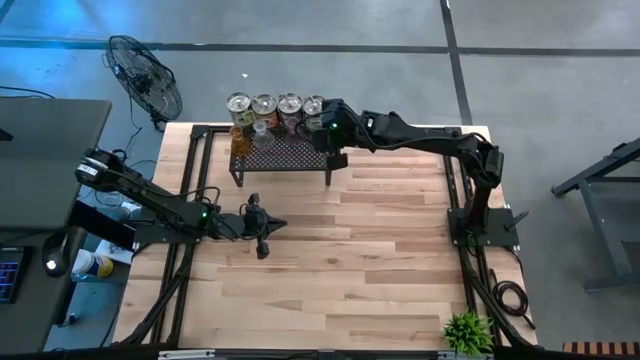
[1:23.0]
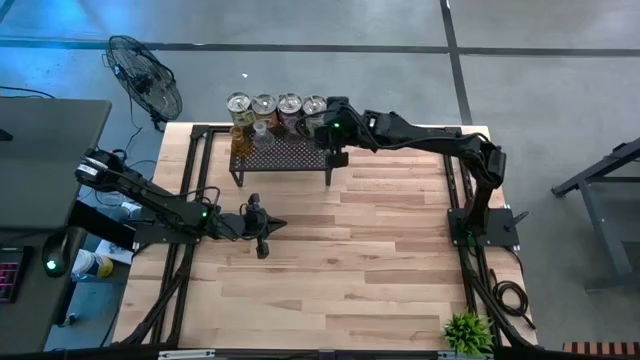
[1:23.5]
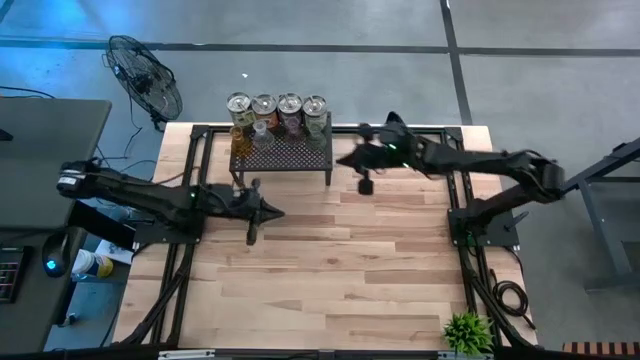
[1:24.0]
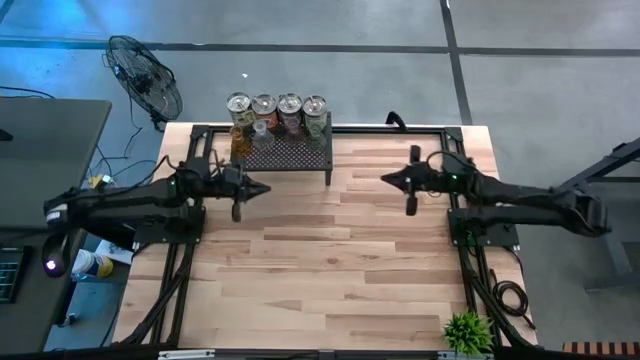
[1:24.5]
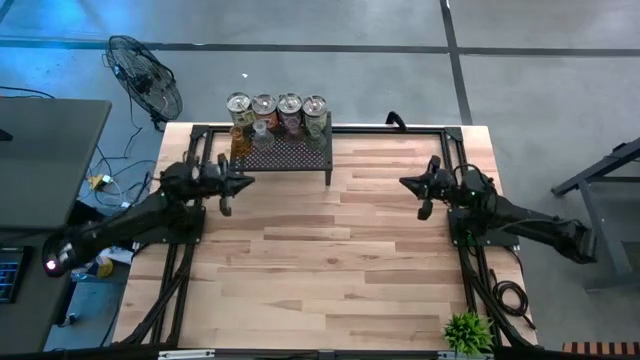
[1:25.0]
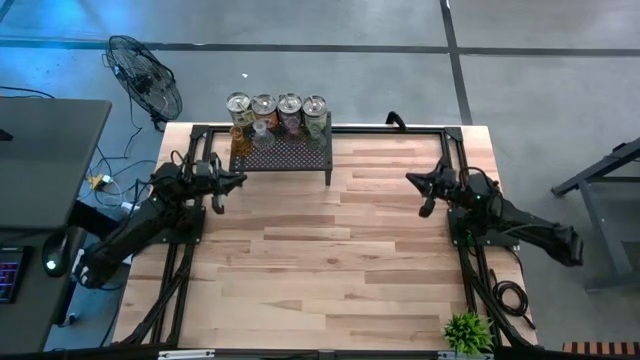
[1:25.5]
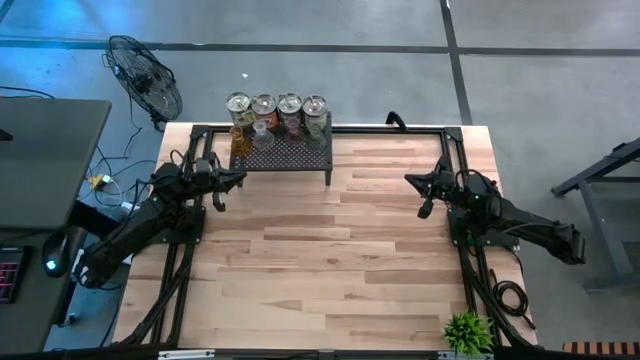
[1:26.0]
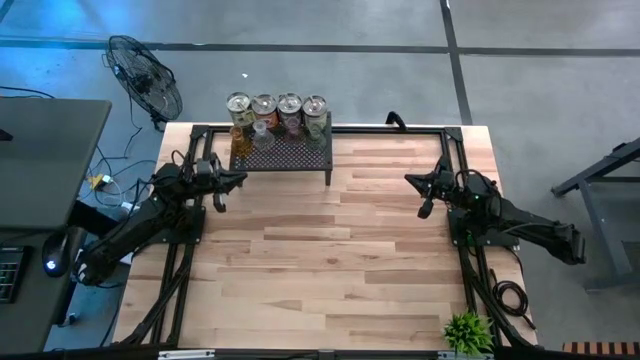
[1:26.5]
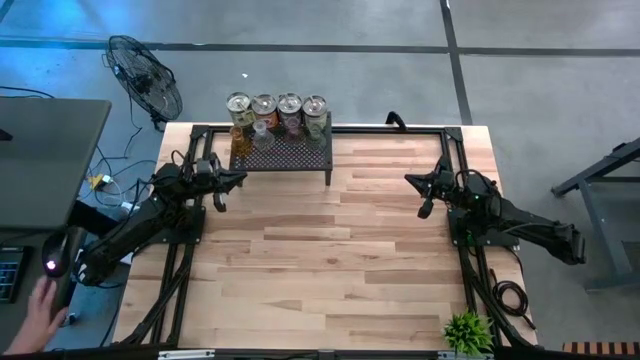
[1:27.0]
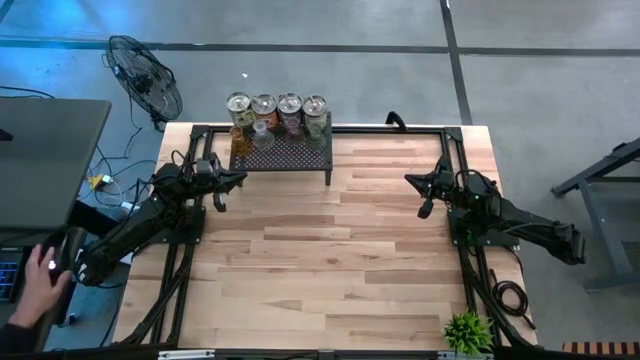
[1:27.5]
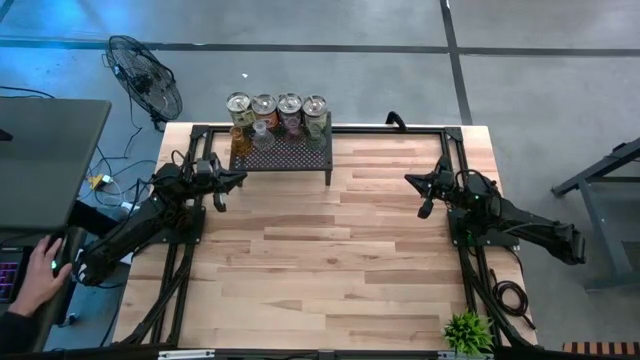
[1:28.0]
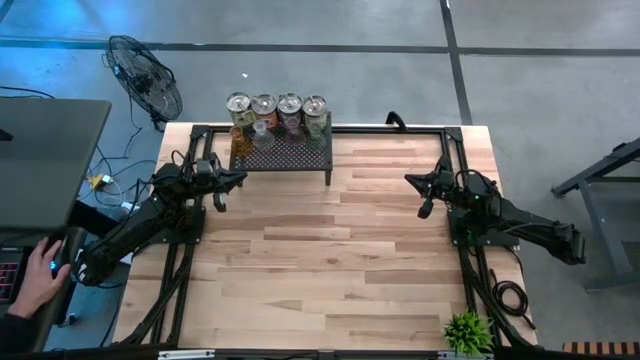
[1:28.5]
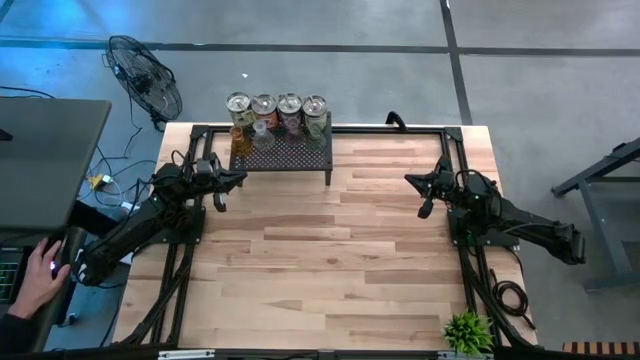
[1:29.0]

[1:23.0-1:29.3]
Task: Pick & Place candle stick holders
Return to Home Position

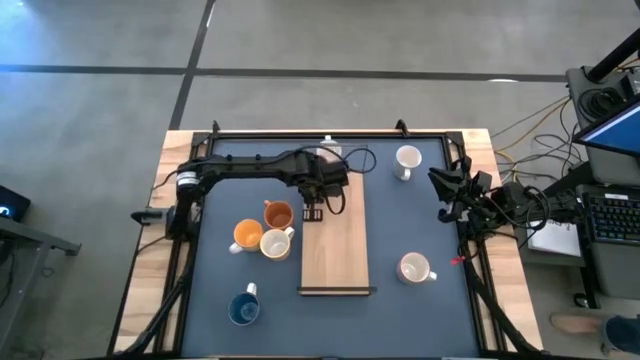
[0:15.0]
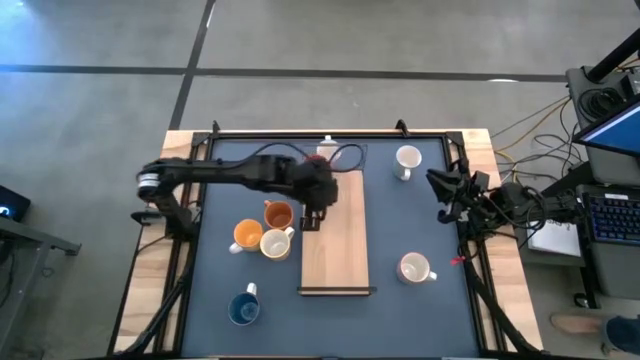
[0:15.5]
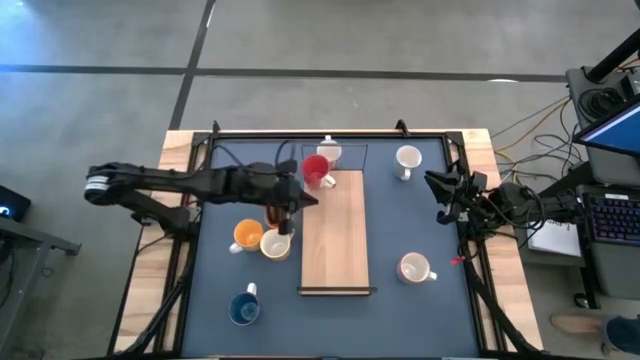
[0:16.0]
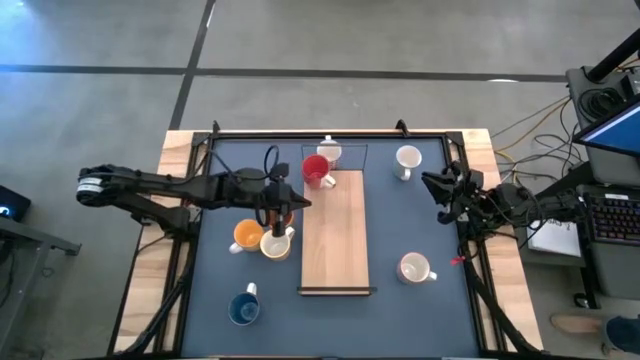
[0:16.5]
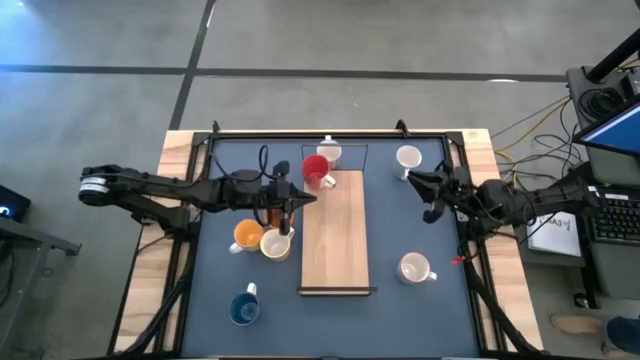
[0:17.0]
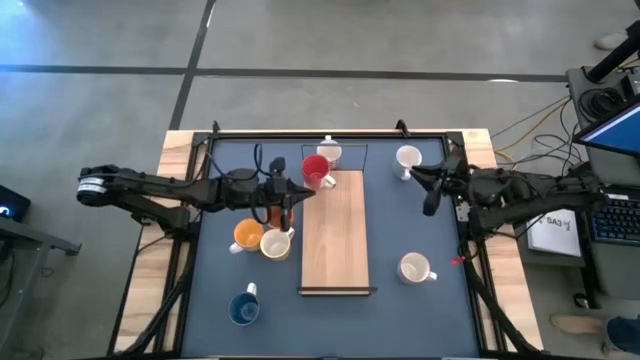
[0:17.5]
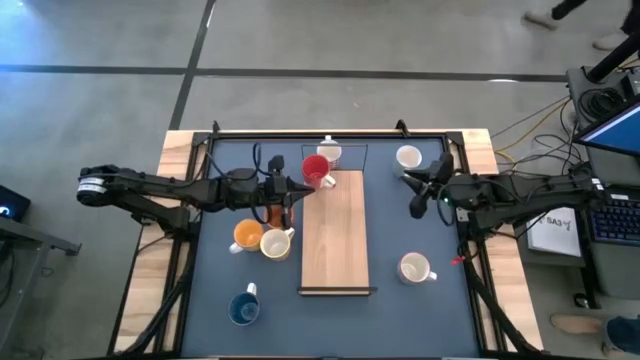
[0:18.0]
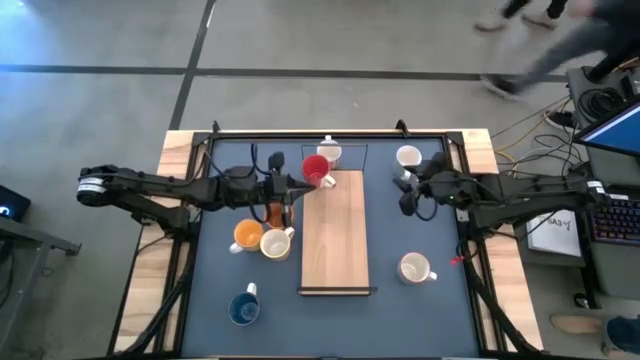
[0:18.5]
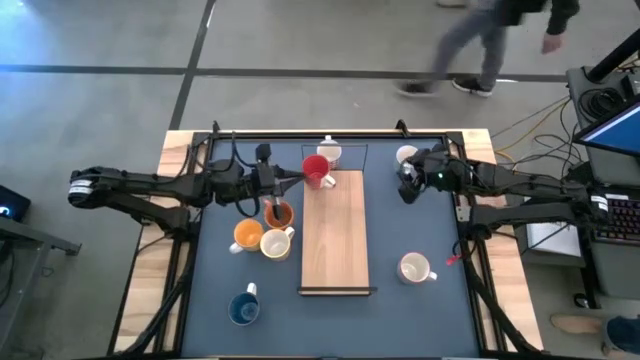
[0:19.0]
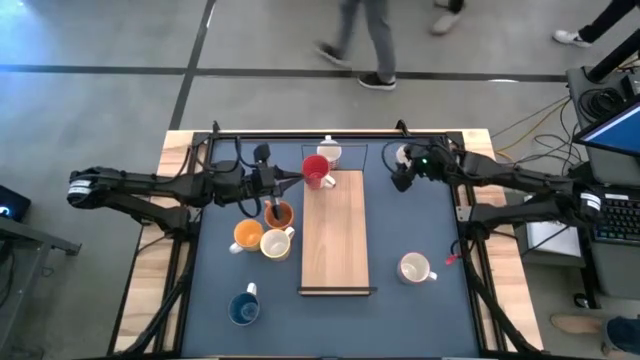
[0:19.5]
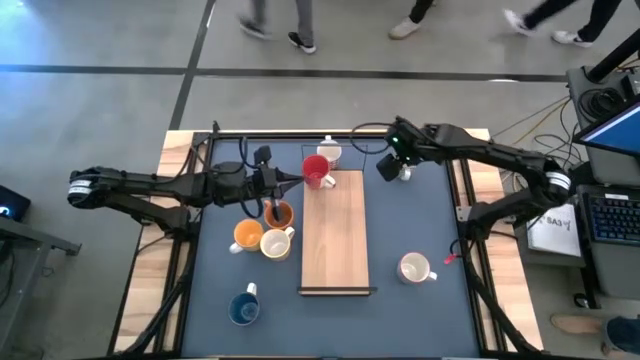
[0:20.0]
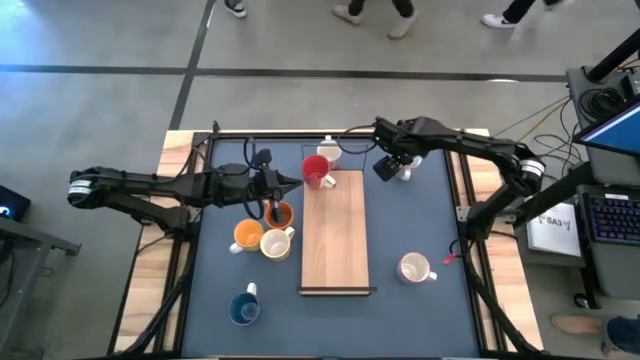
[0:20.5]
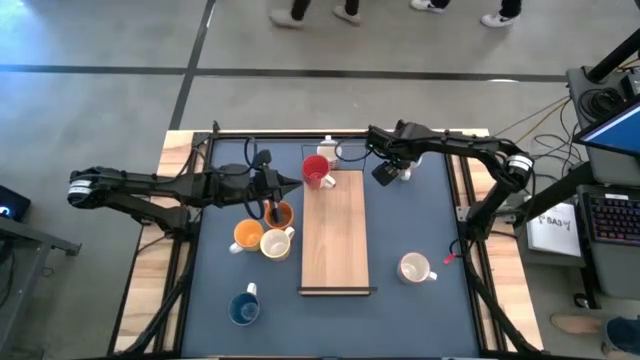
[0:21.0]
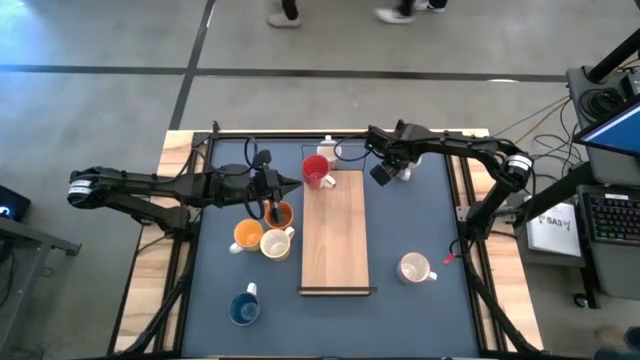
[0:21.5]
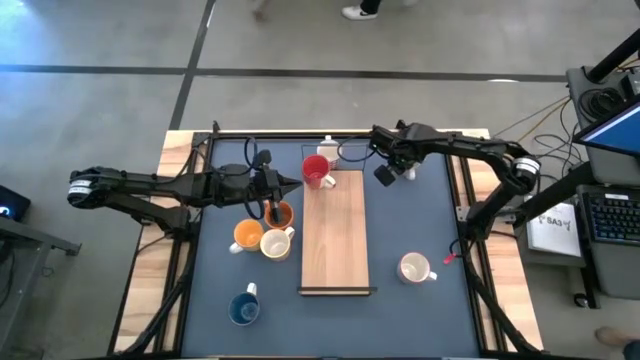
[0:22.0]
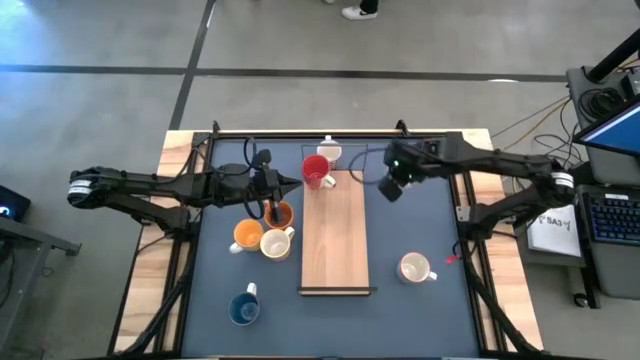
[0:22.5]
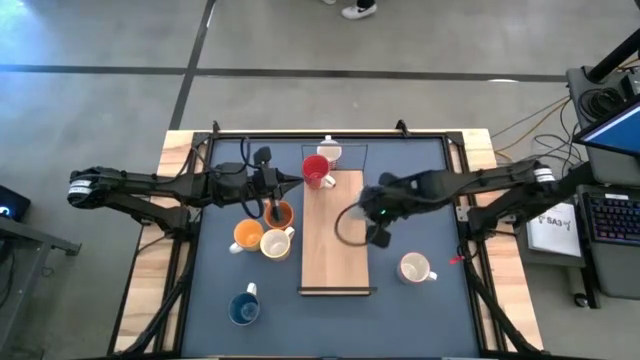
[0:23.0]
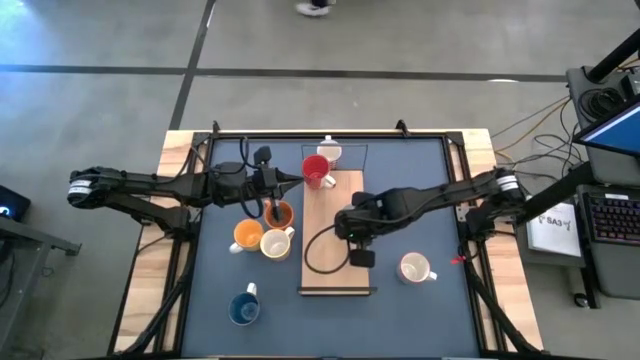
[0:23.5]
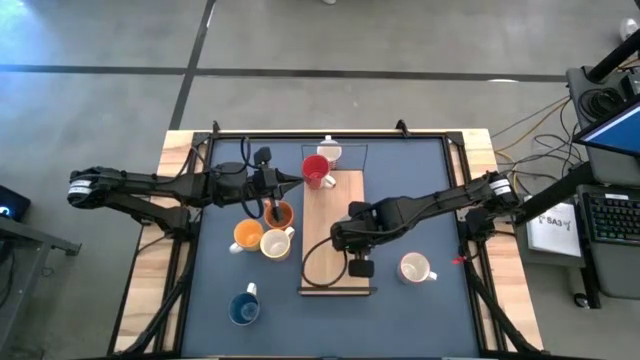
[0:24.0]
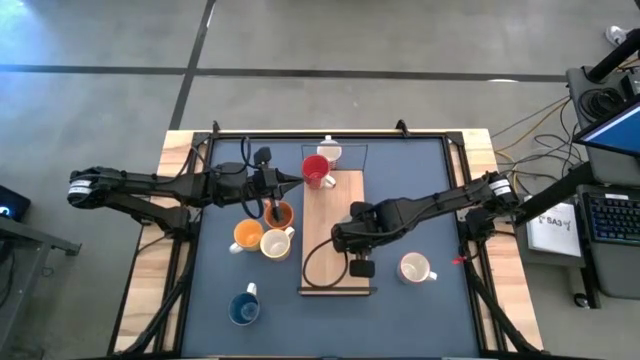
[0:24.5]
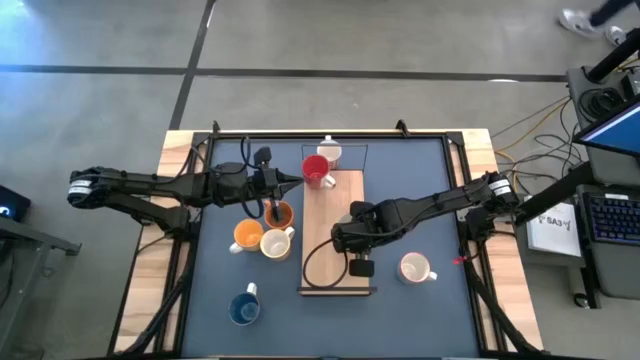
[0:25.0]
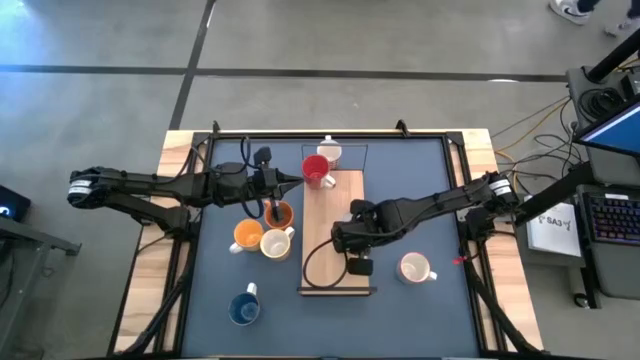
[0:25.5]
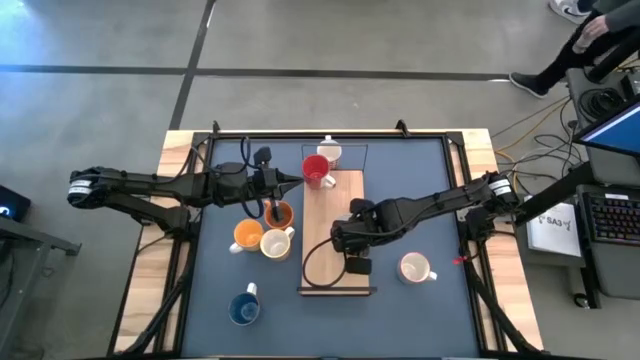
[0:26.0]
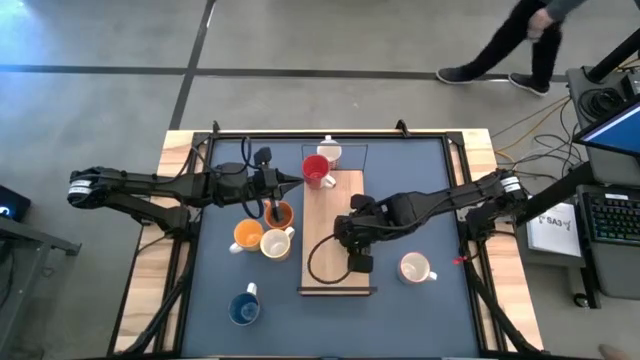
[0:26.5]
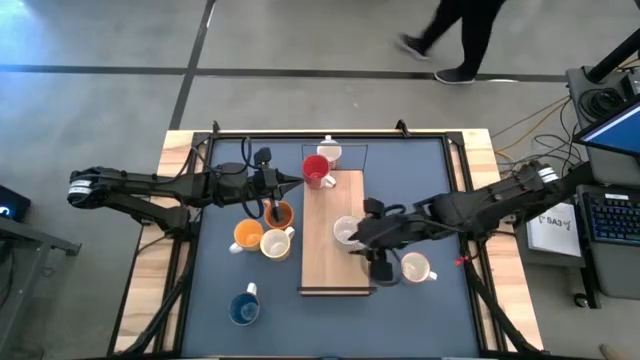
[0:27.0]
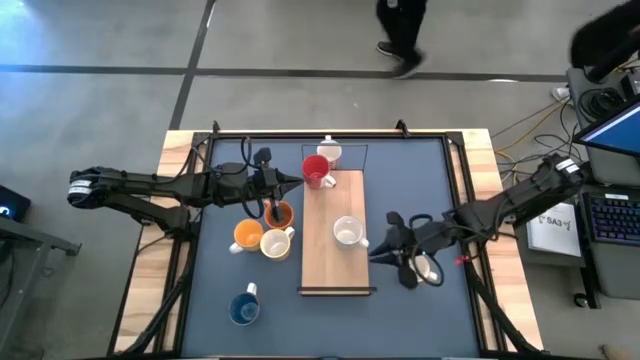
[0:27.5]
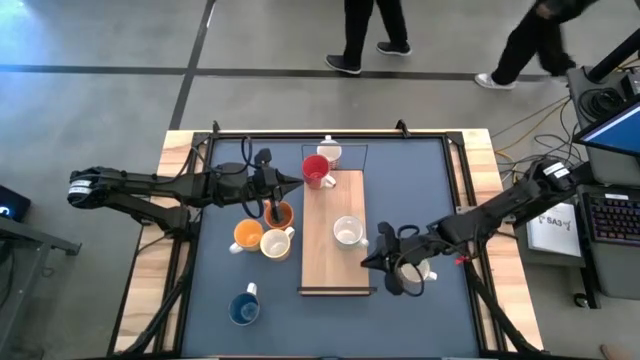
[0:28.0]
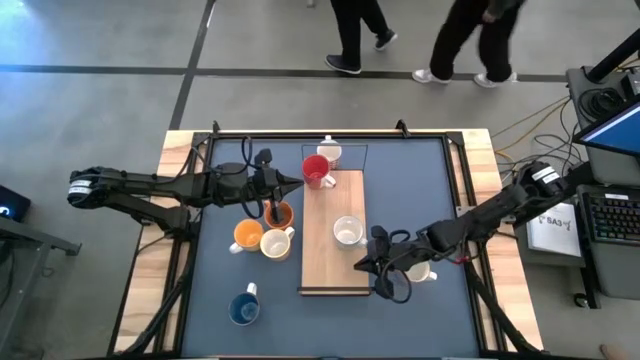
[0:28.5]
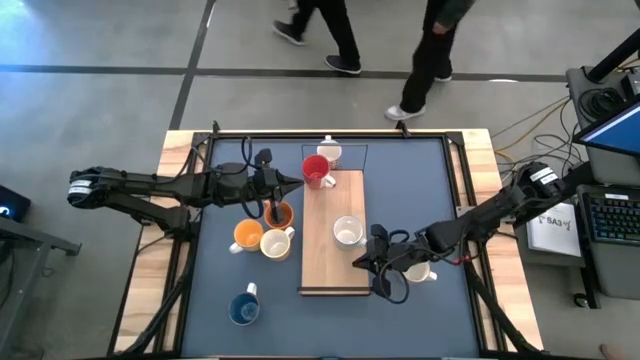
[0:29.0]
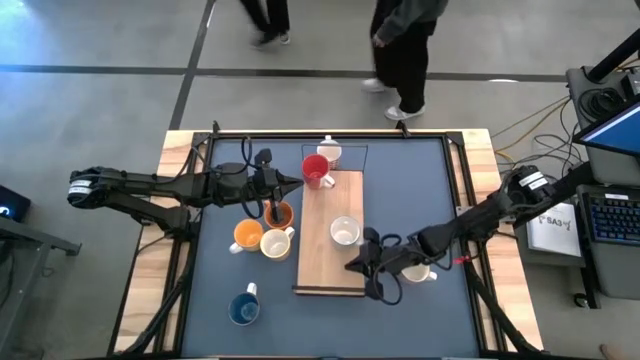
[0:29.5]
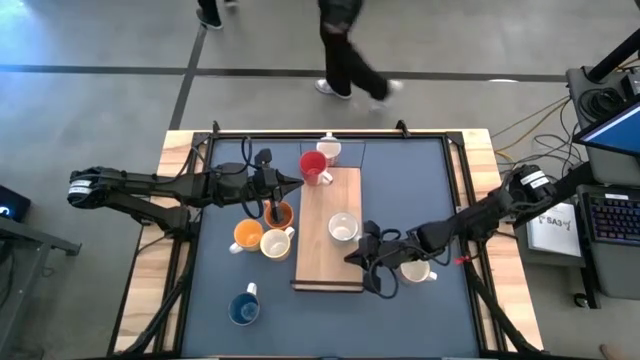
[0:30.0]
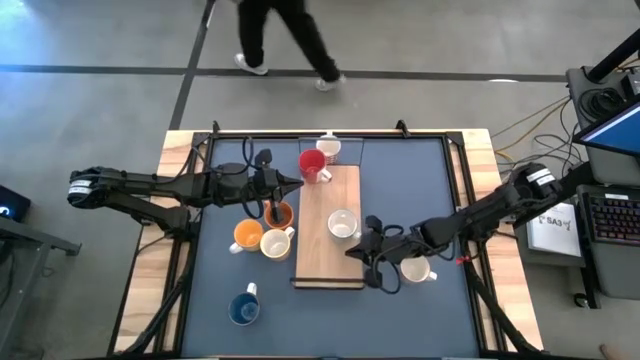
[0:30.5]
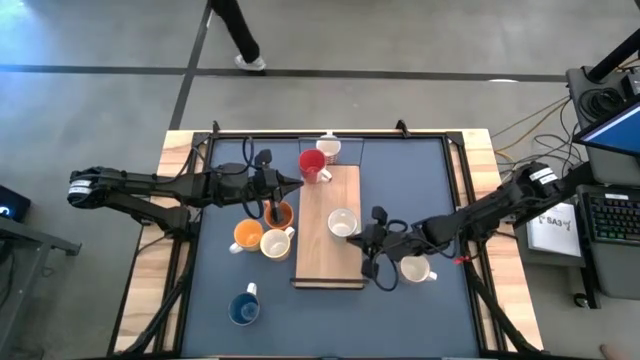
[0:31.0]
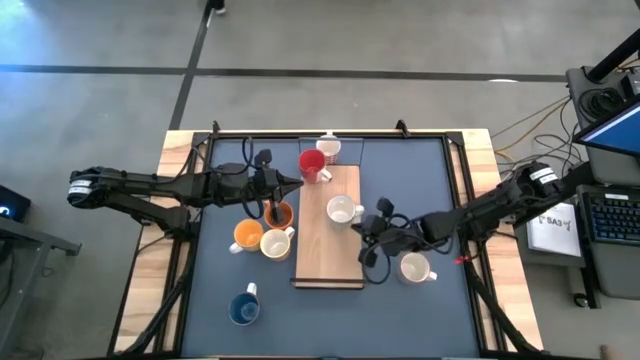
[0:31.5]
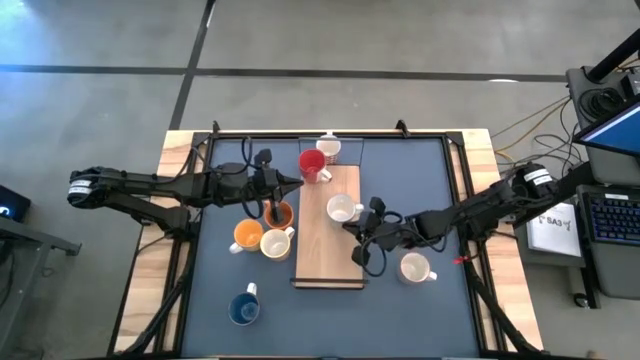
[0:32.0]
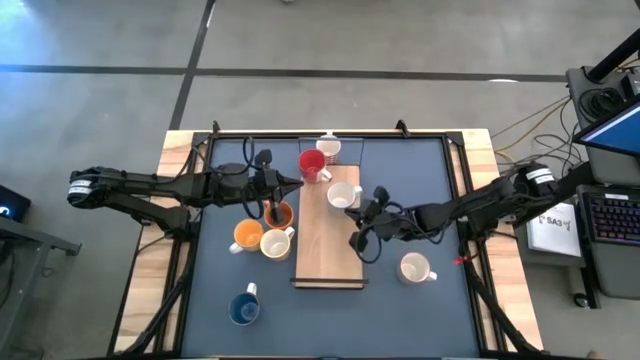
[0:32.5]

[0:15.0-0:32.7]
Task: Place coffee mugs
Put the blue patterned mug on the shelf
